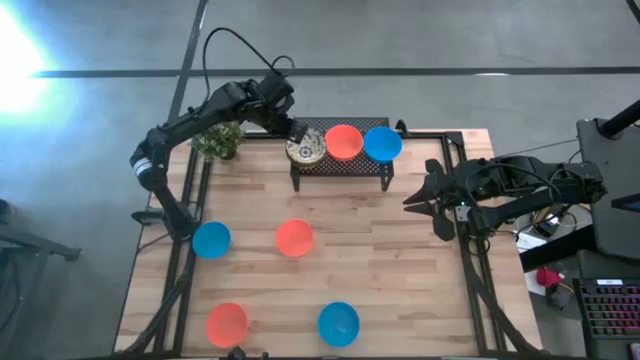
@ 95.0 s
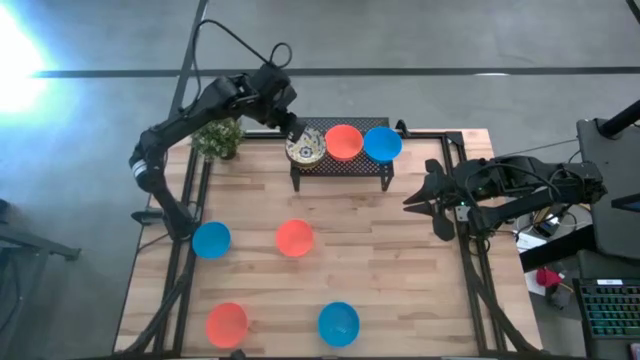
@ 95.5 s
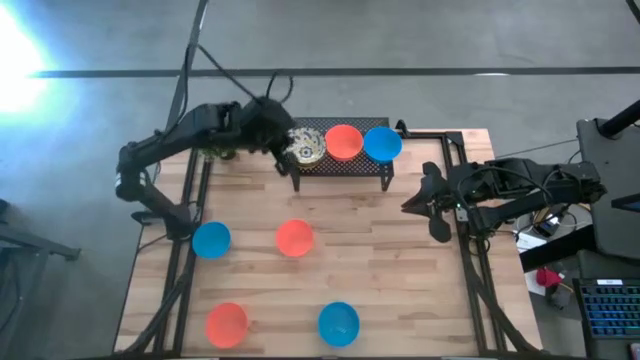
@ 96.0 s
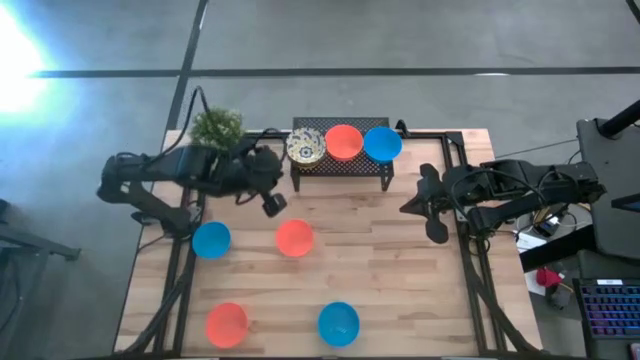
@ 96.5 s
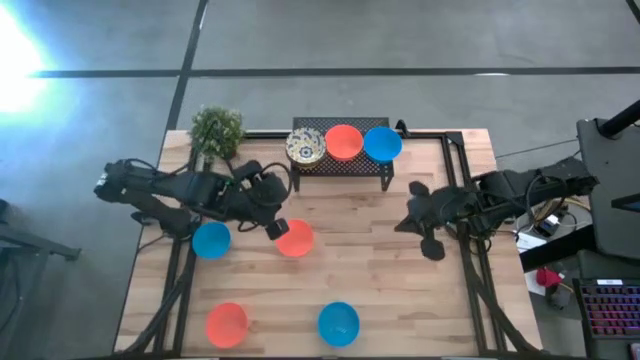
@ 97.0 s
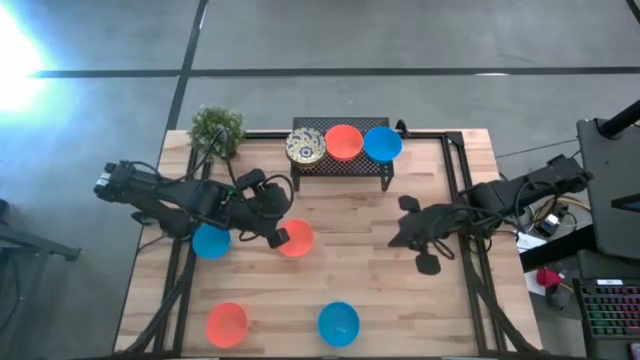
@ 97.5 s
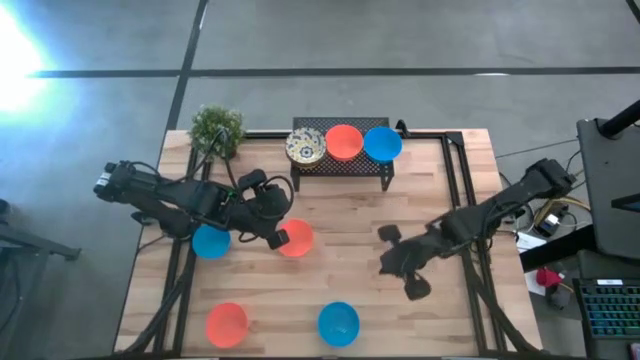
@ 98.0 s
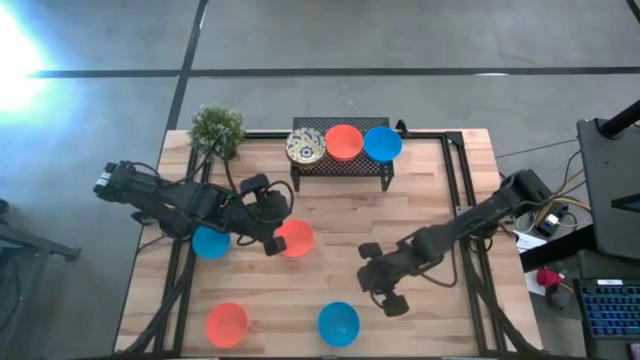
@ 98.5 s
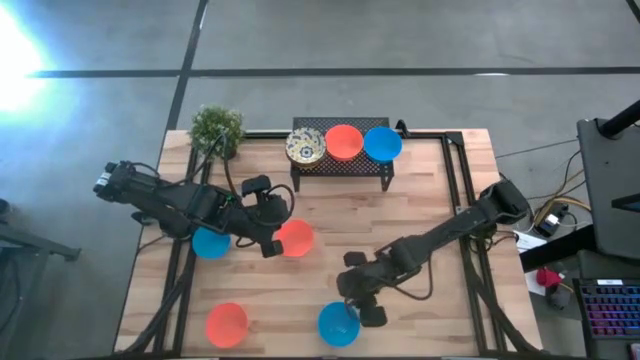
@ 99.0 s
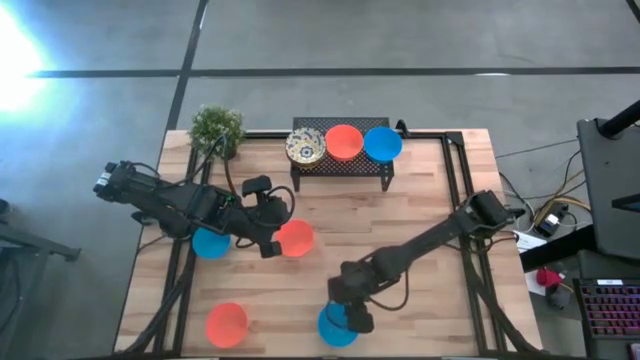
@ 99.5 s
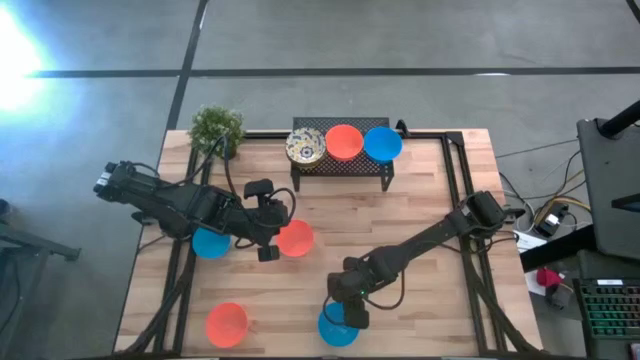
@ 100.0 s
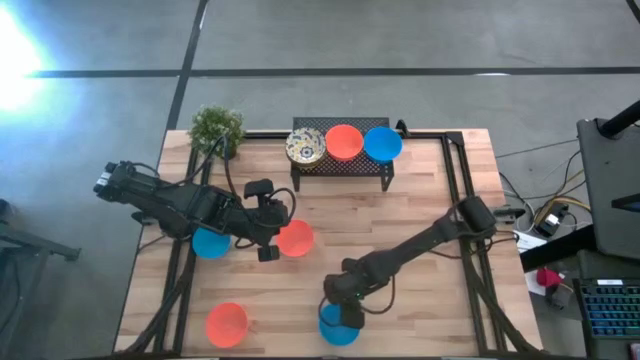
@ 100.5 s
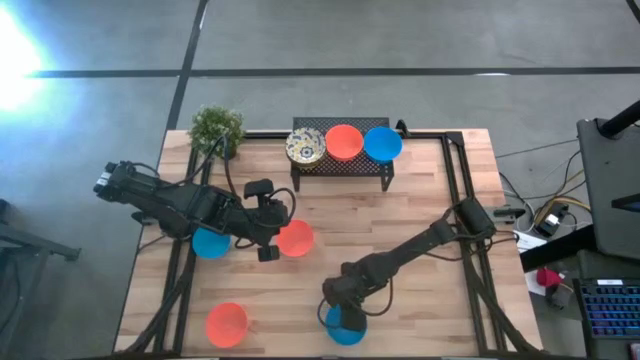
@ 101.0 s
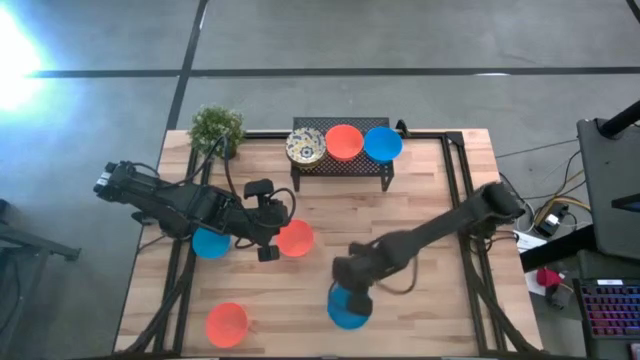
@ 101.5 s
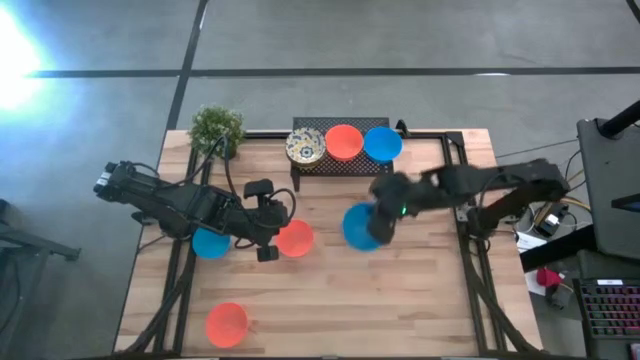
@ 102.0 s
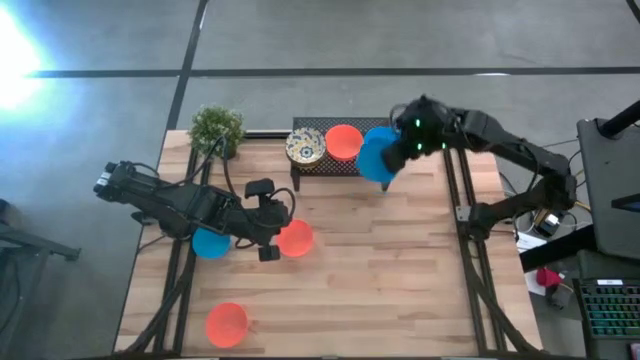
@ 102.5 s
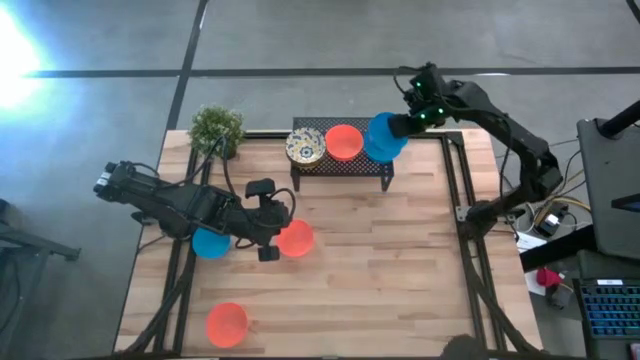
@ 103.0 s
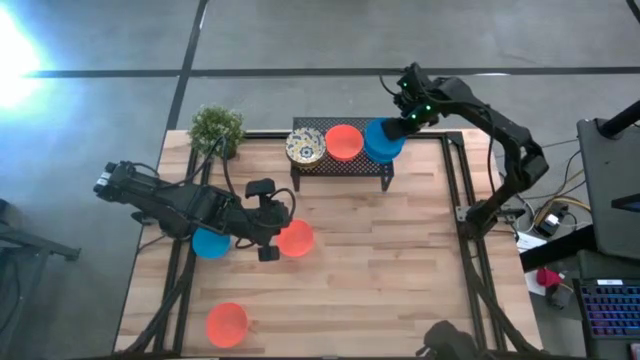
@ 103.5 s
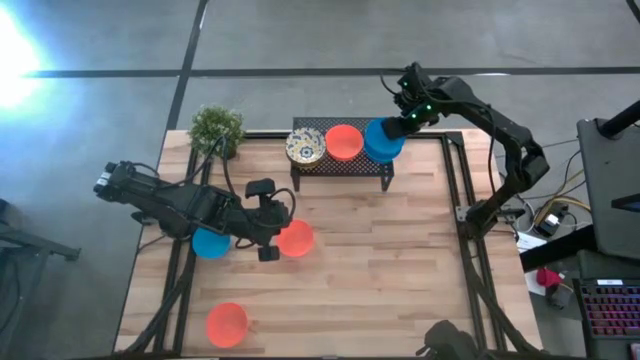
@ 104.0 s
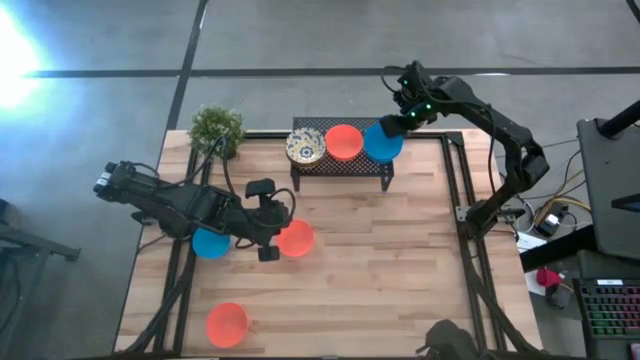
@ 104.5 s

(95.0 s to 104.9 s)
Task: Pick & Place Mini bowls
Stack the bottom blue bowl on the blue bowl on the shelf

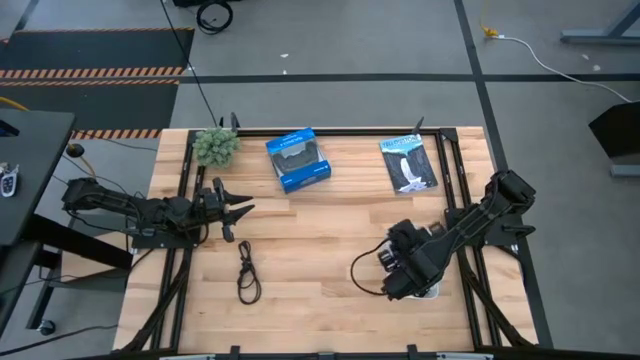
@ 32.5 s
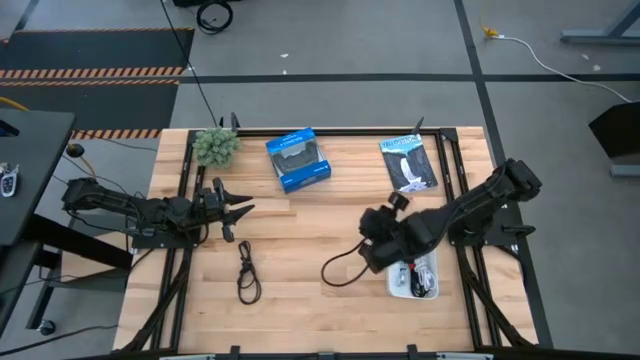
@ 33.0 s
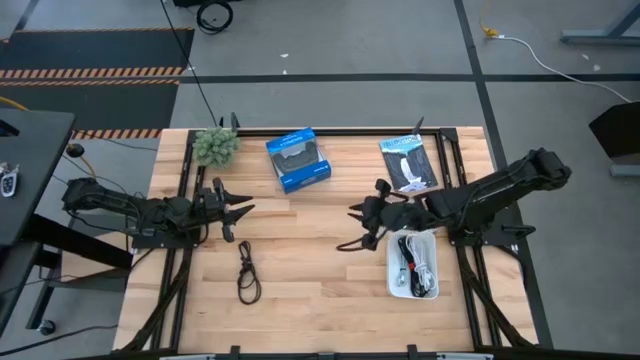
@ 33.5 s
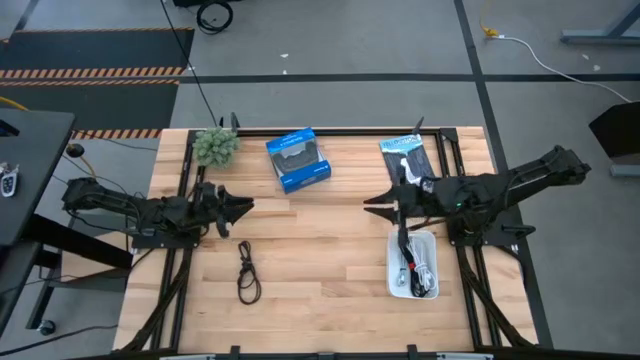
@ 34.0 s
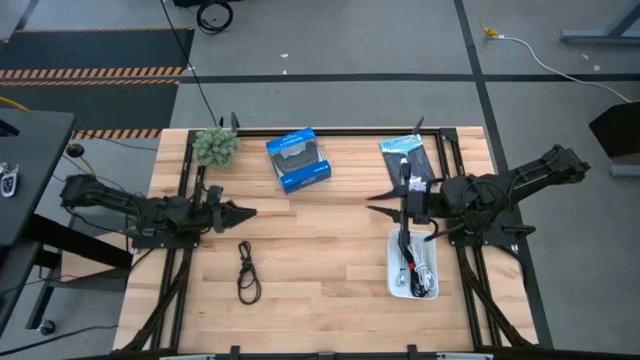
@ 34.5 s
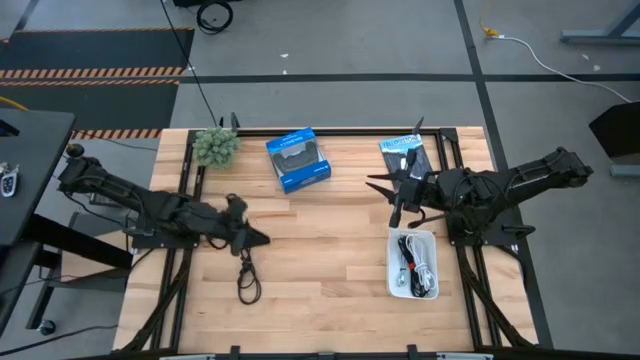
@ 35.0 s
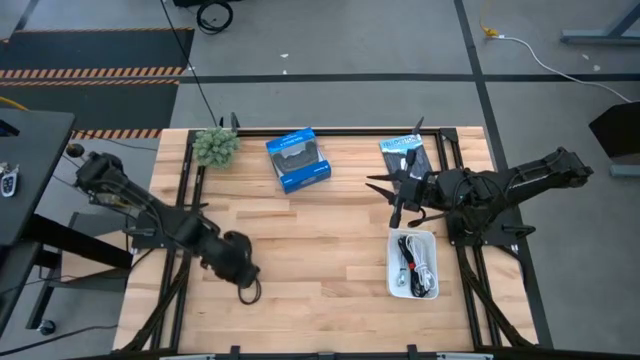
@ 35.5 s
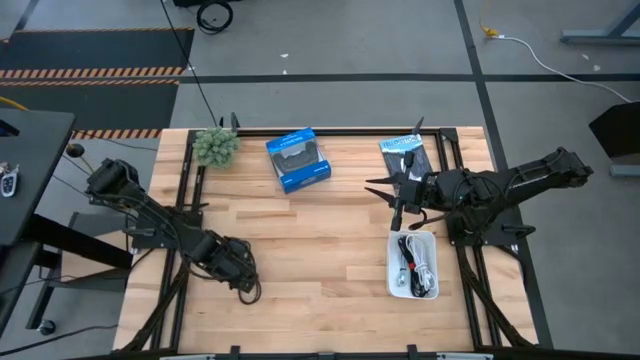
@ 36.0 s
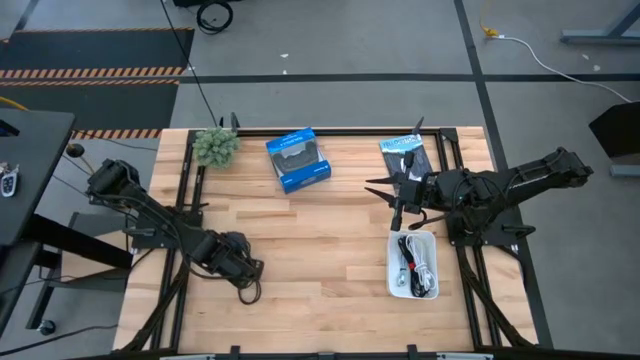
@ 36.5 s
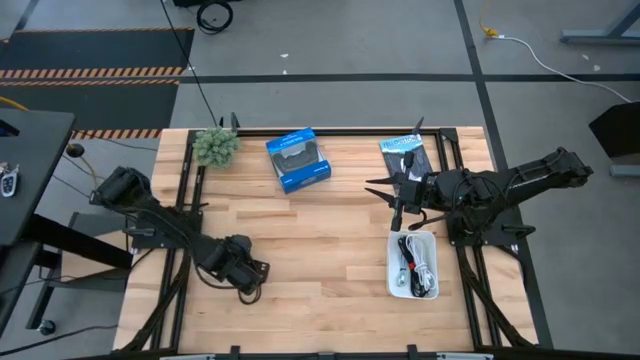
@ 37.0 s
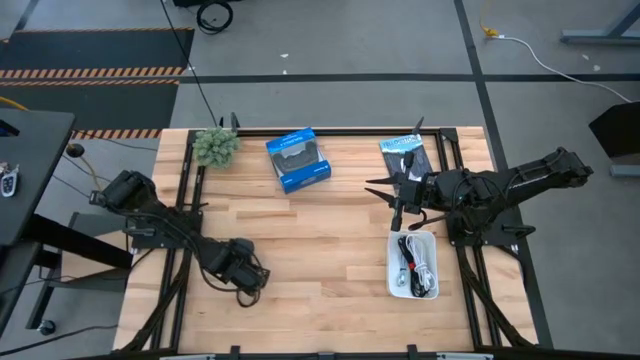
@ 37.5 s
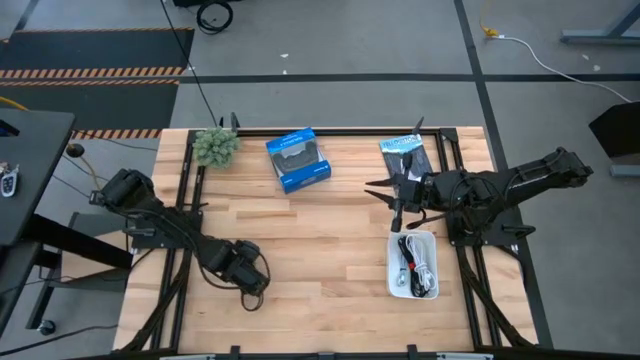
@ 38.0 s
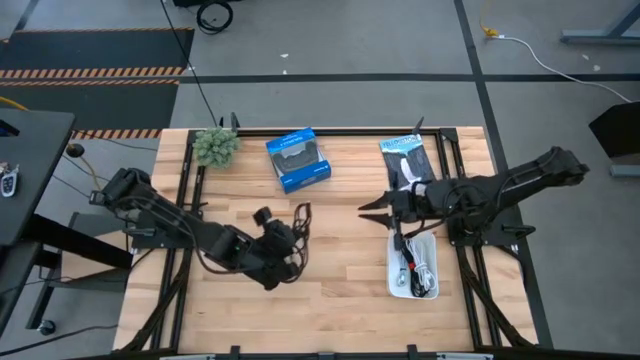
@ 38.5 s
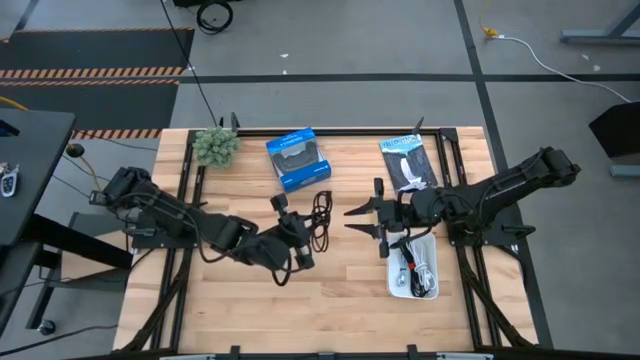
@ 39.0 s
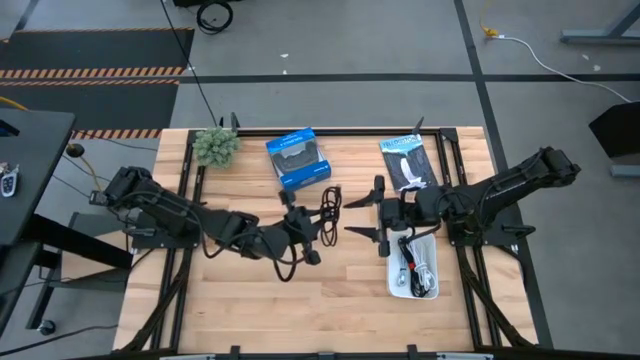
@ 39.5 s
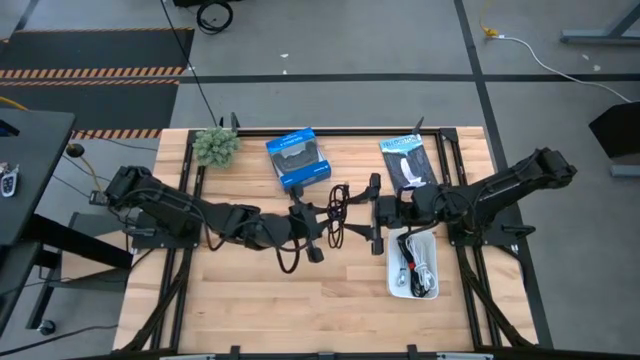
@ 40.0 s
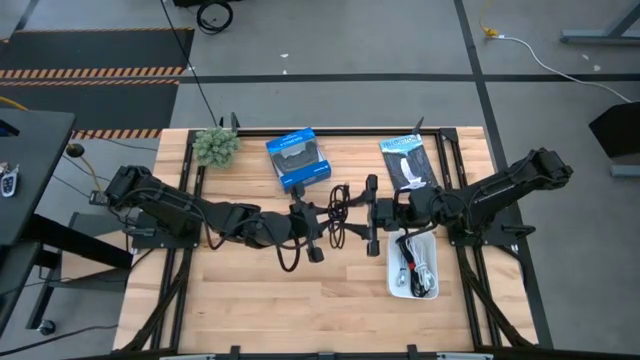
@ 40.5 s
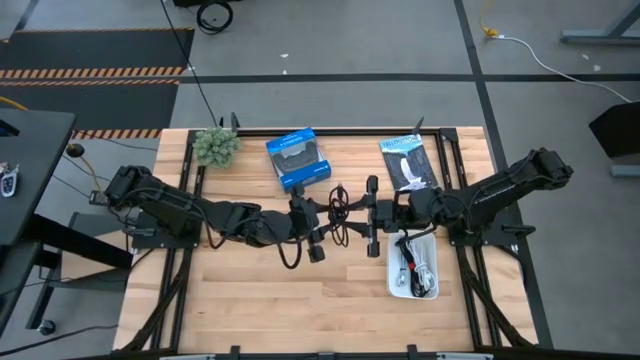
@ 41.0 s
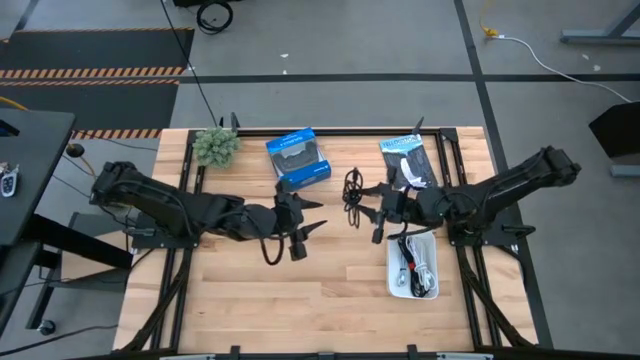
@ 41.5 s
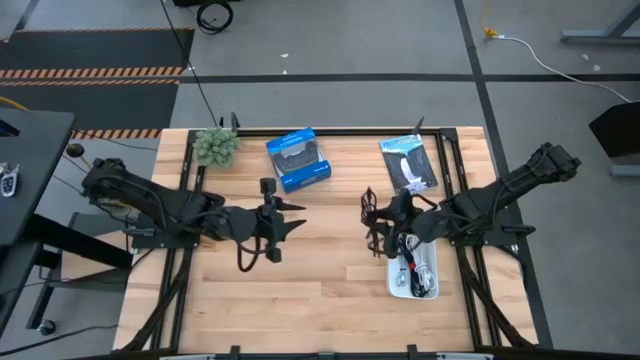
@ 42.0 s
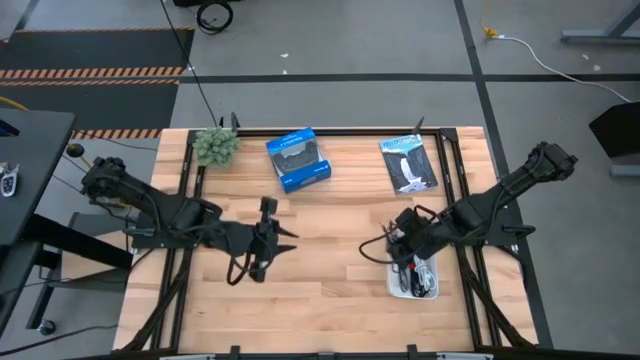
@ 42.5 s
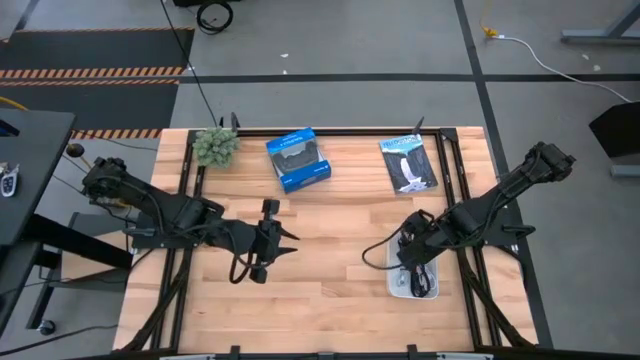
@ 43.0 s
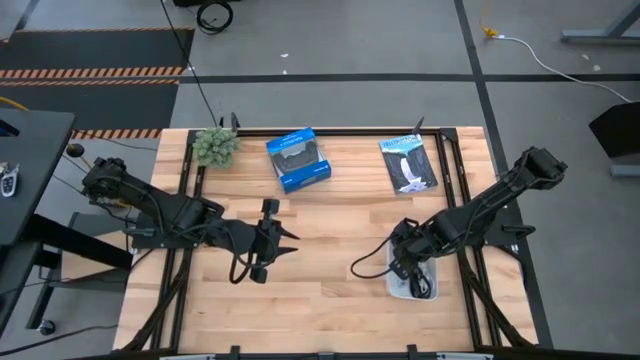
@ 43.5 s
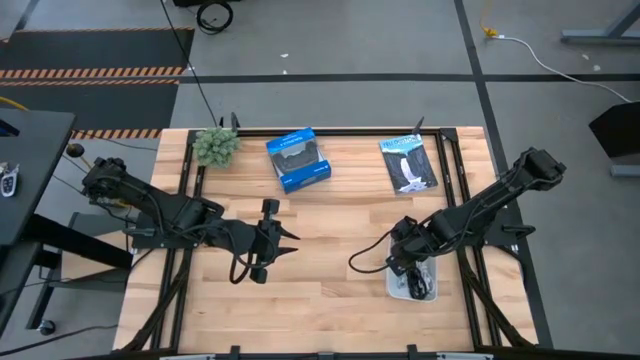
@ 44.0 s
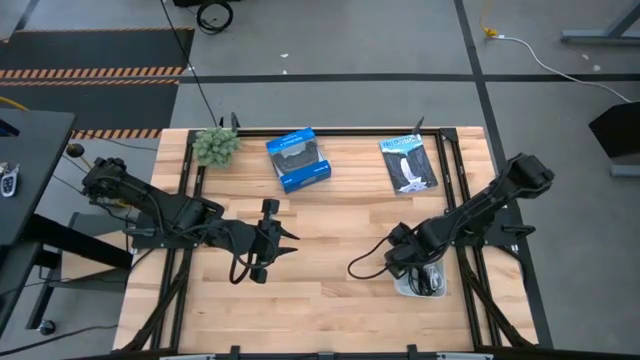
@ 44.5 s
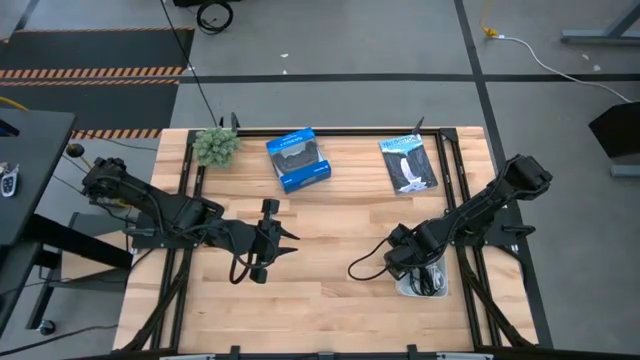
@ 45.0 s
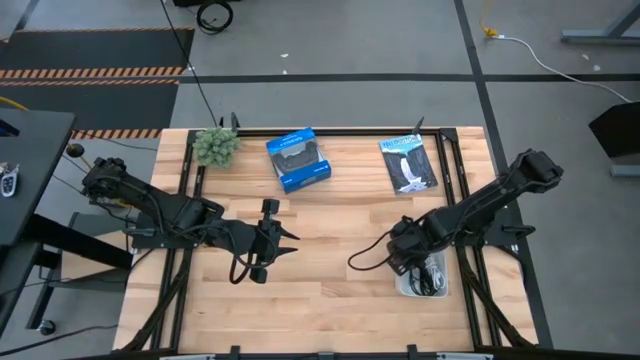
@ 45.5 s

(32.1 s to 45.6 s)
Task: Pick and place USB-C Cables
Put the black charger cable into the white bin
